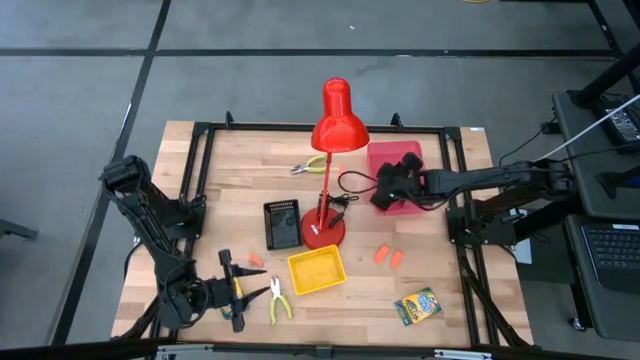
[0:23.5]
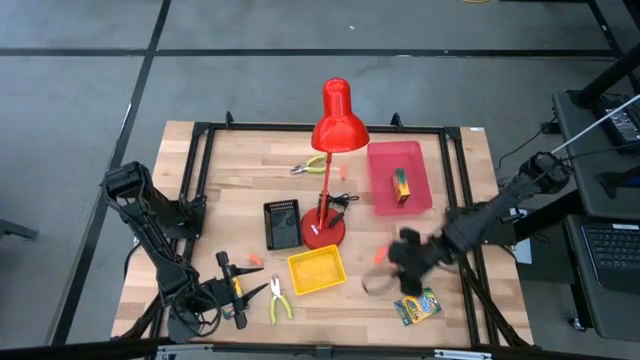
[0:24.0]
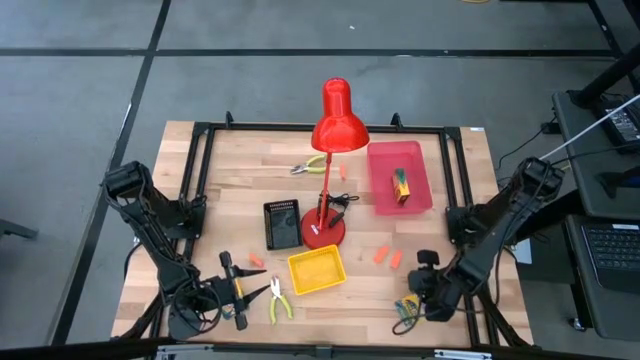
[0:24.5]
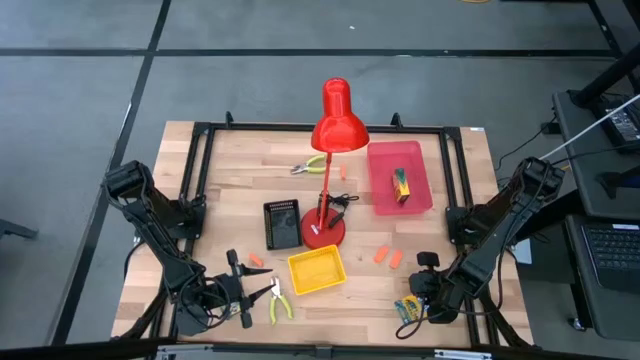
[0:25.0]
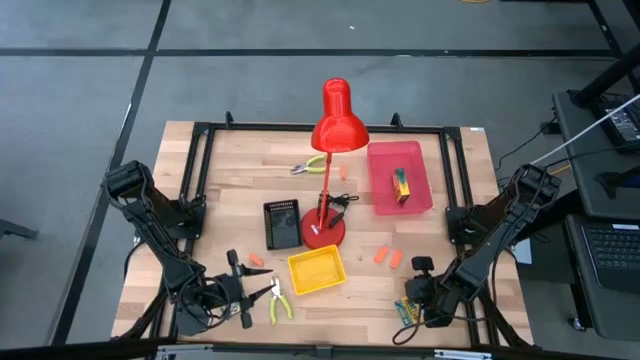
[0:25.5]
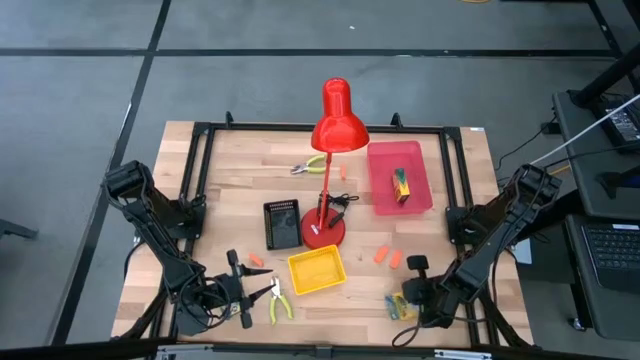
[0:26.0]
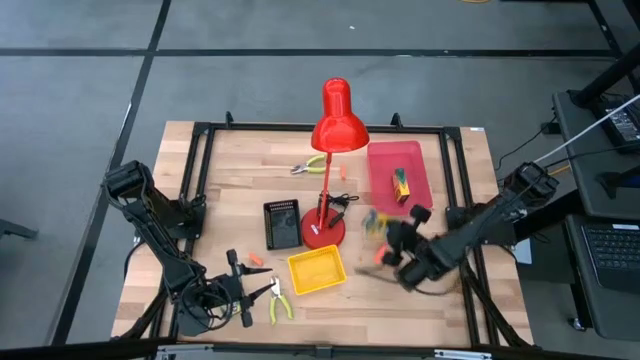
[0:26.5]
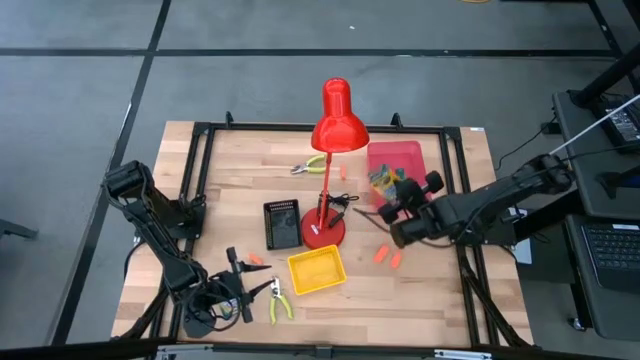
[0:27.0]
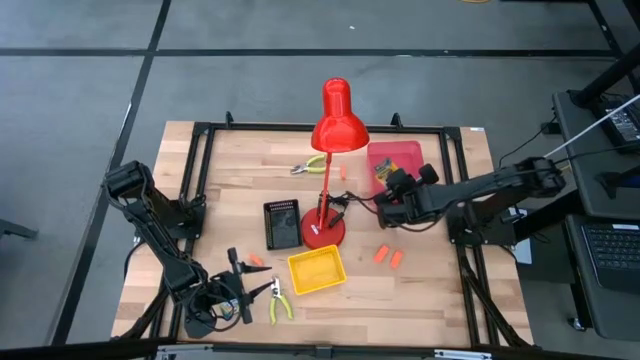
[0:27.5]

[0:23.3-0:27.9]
Task: Pick & Place School Supplies
Put the crayon box into the pink bin

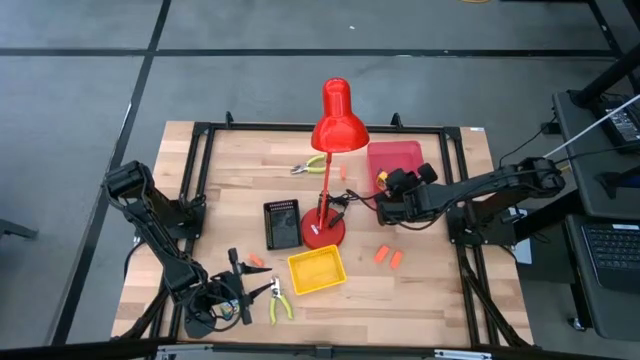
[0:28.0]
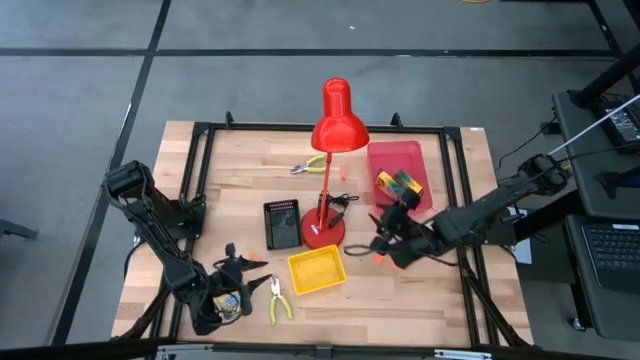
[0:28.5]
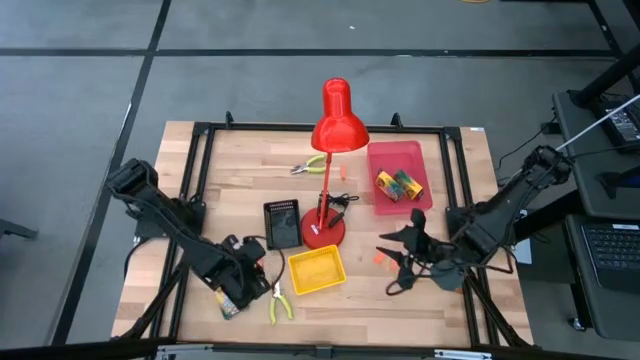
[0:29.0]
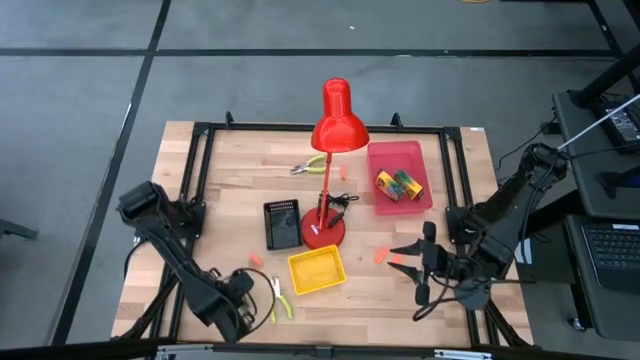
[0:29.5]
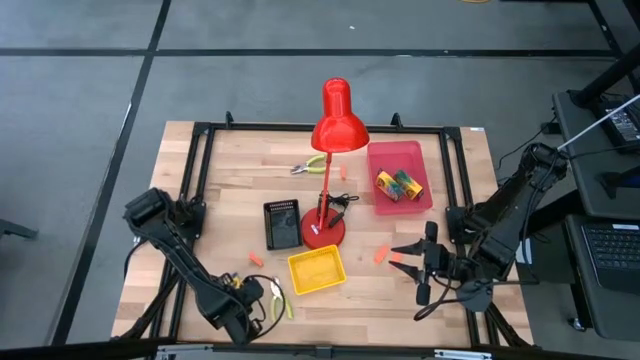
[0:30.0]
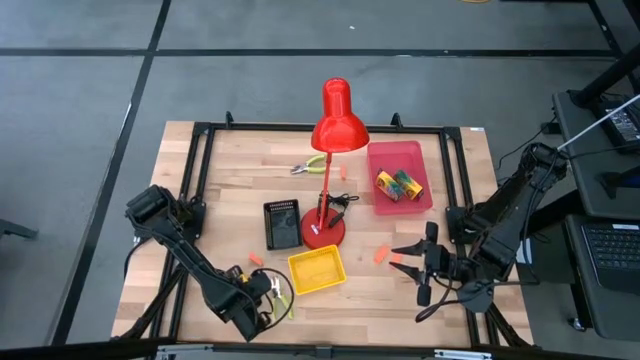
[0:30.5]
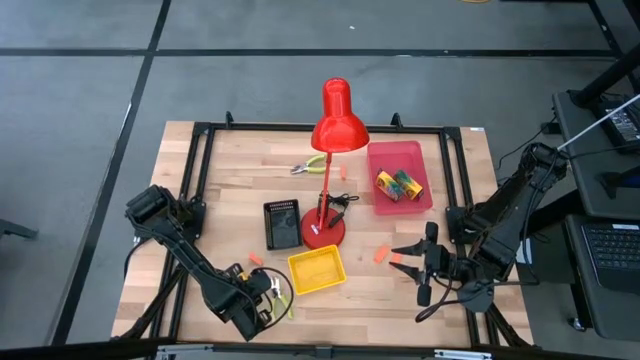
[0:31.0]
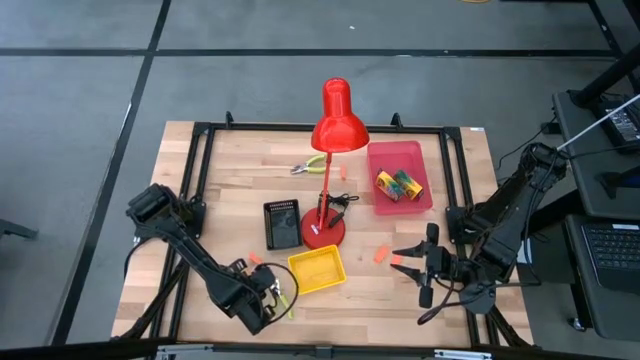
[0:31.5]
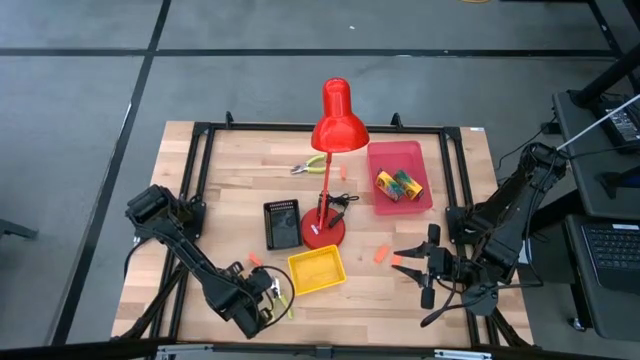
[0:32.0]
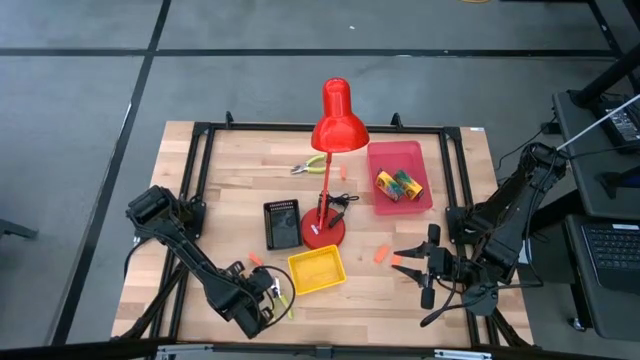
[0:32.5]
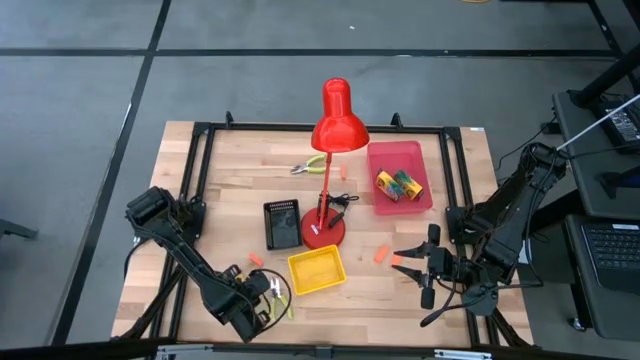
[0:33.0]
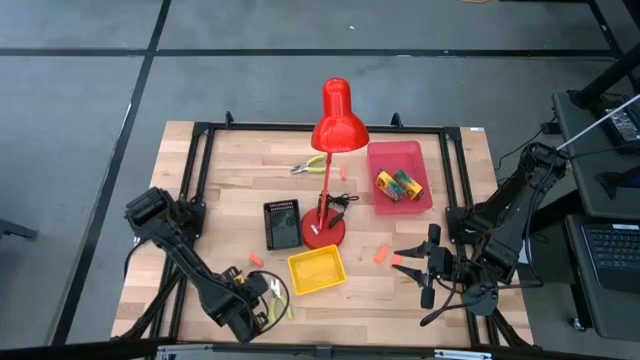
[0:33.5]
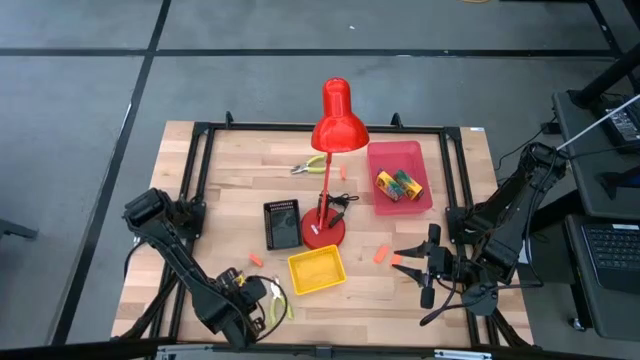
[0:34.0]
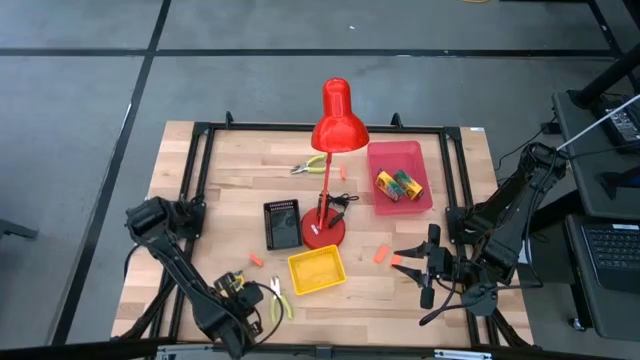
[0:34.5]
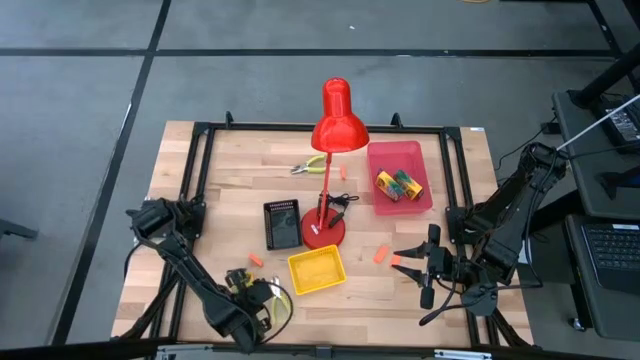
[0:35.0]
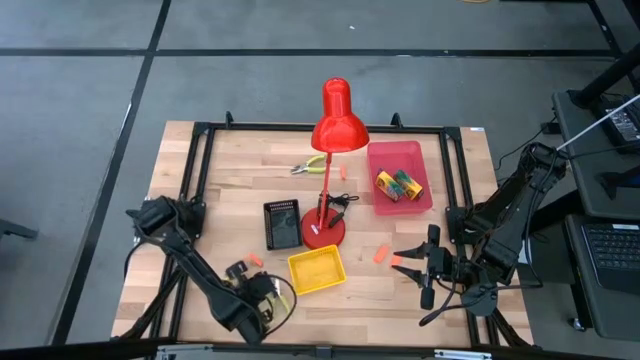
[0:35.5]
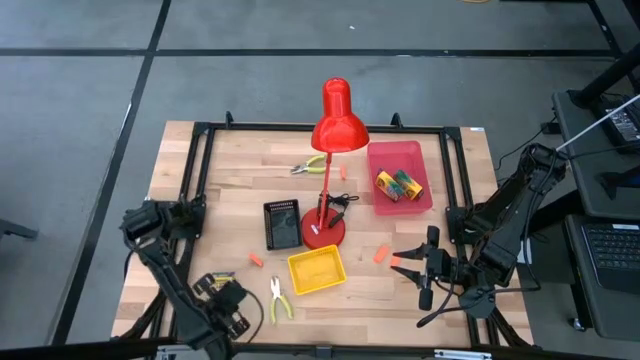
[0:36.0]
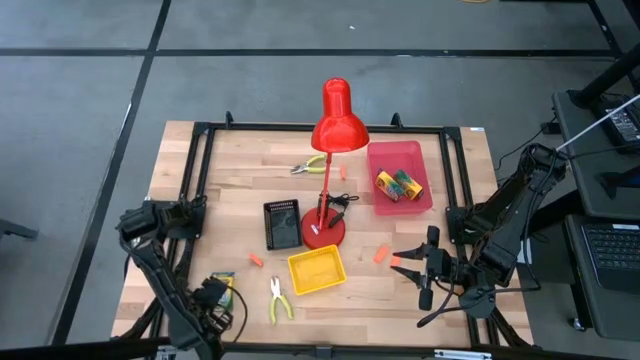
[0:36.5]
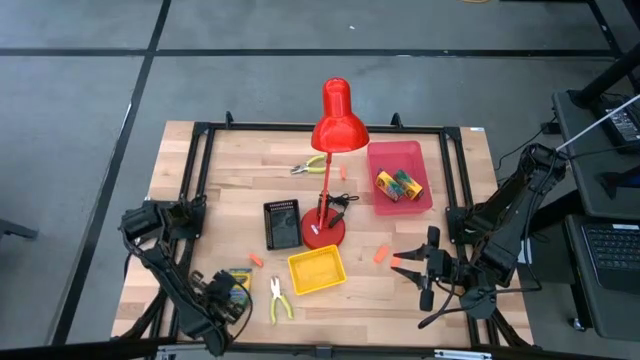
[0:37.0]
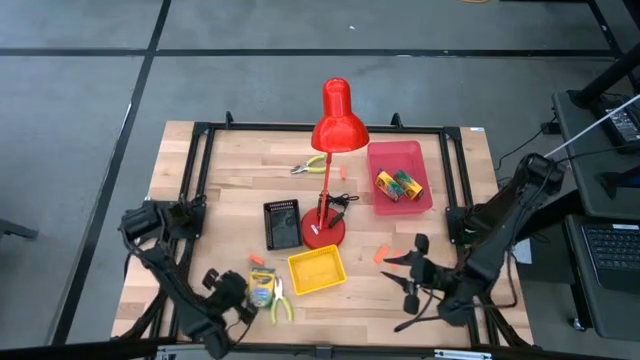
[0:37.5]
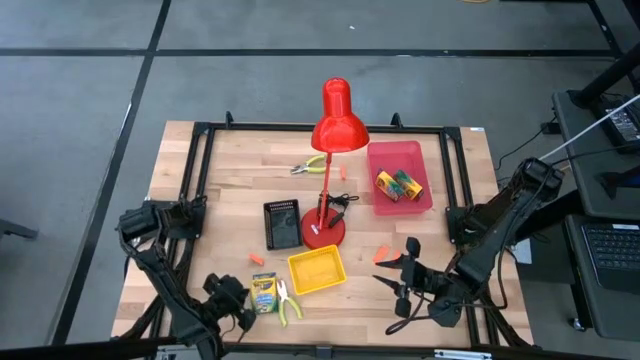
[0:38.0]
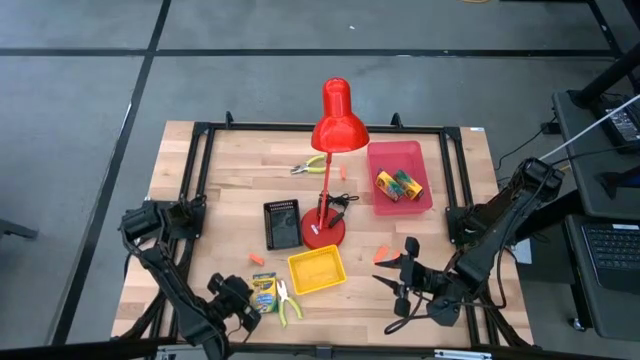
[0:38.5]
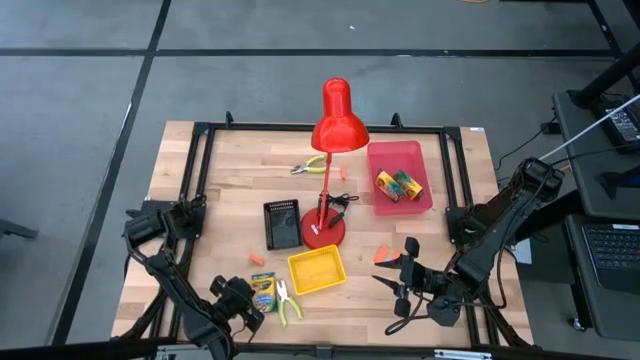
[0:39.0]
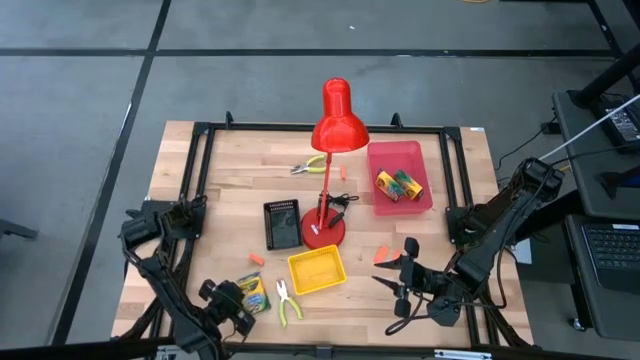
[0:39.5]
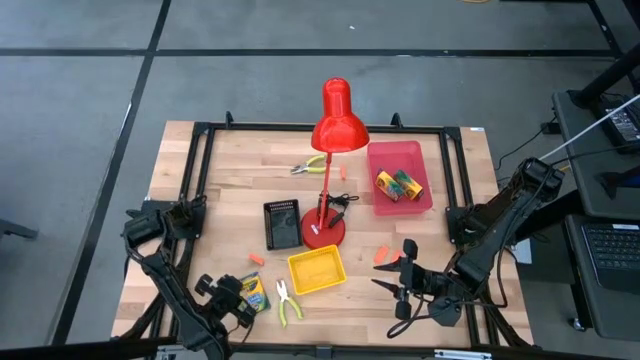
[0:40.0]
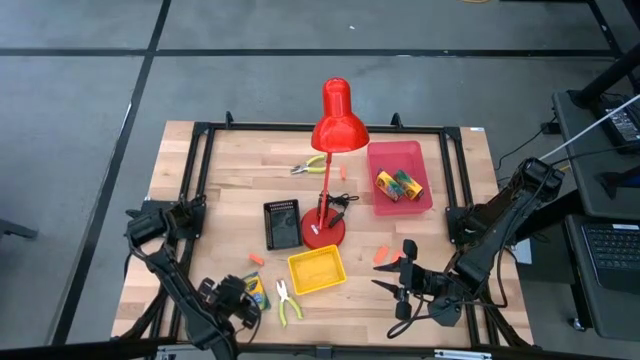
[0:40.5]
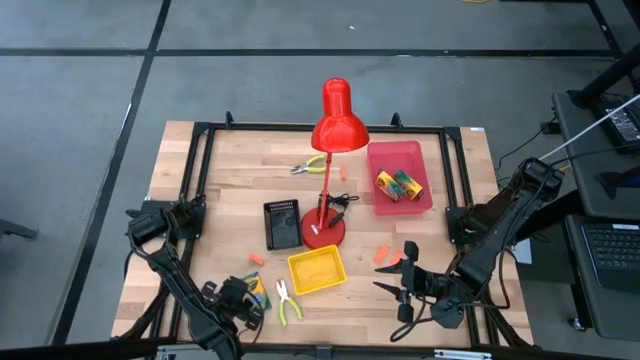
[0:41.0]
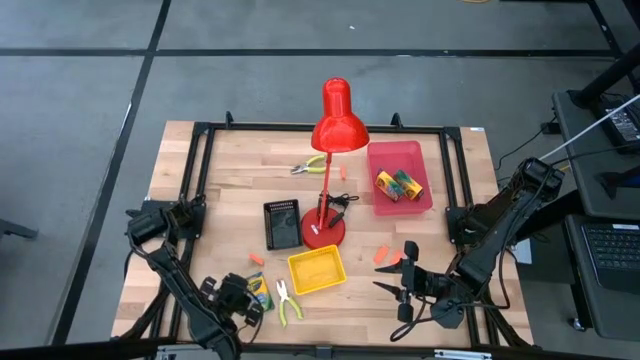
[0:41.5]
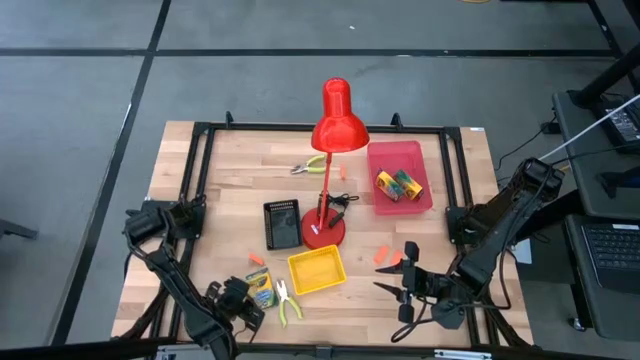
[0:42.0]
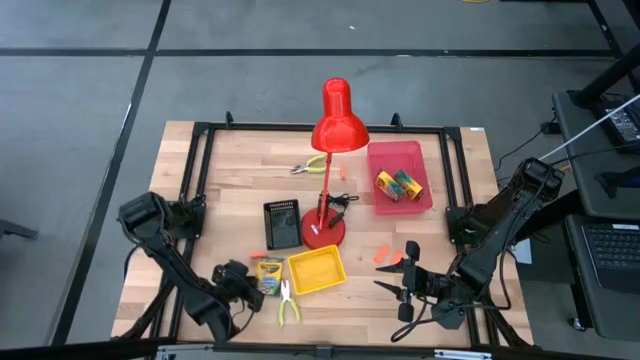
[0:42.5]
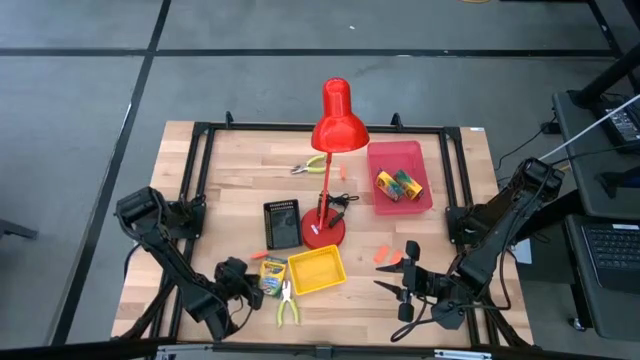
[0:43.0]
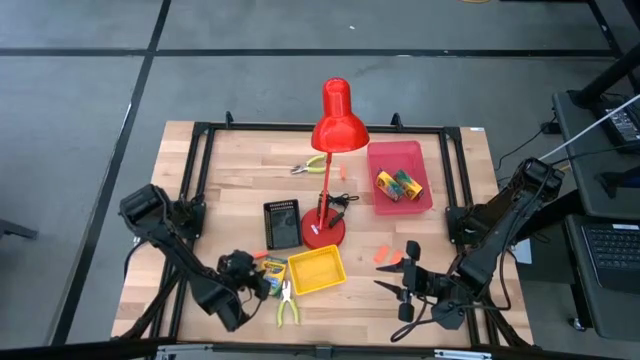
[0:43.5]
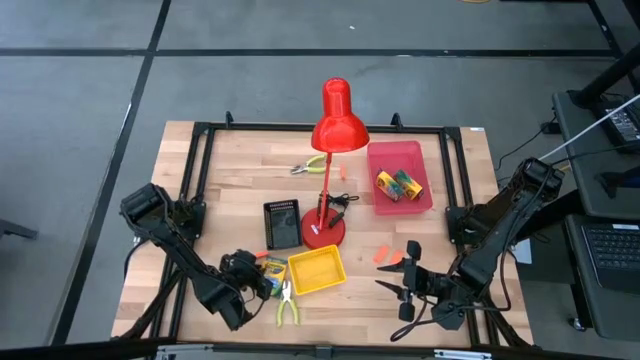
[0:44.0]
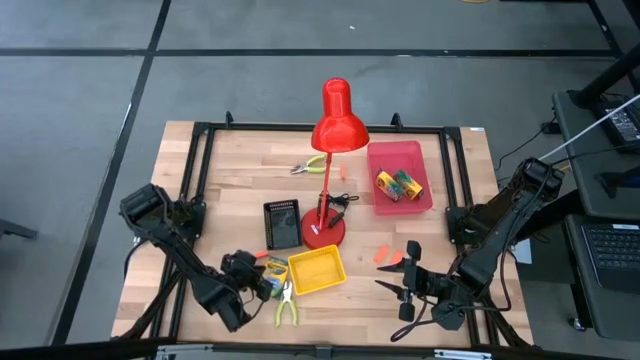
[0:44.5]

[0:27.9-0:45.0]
Put the crayon box into the pink bin
